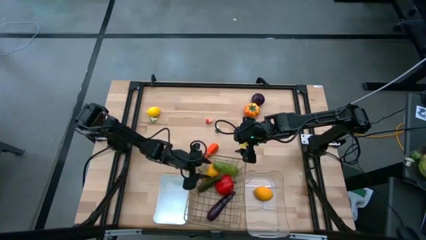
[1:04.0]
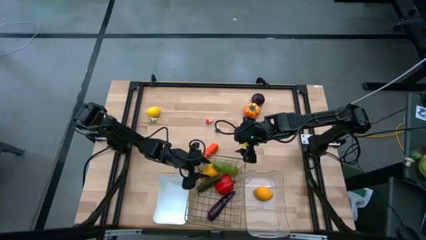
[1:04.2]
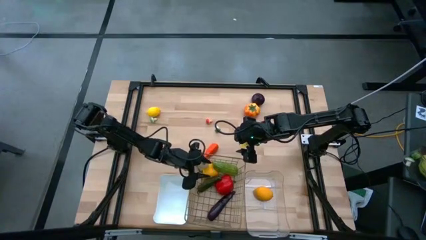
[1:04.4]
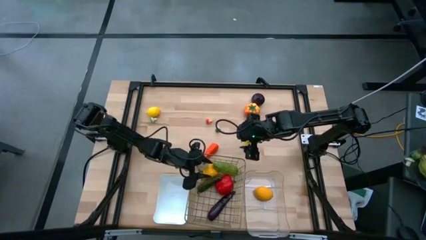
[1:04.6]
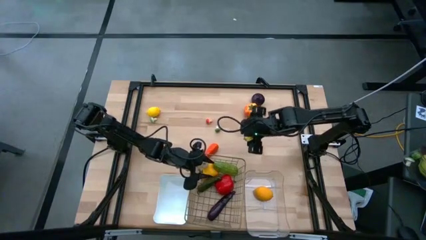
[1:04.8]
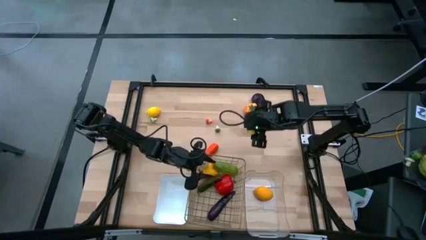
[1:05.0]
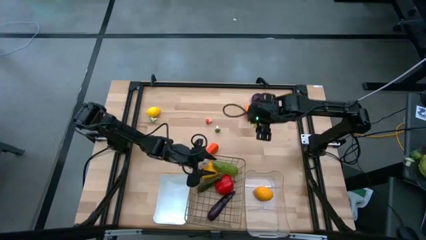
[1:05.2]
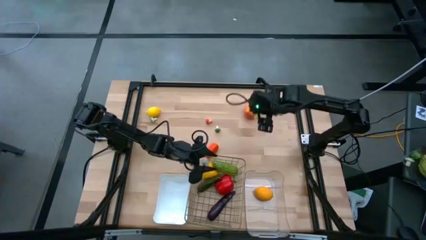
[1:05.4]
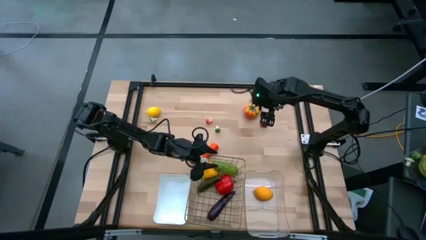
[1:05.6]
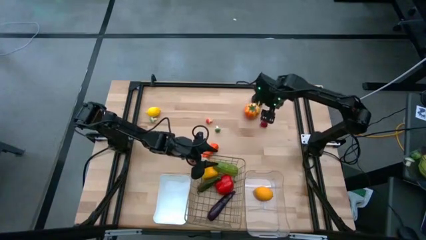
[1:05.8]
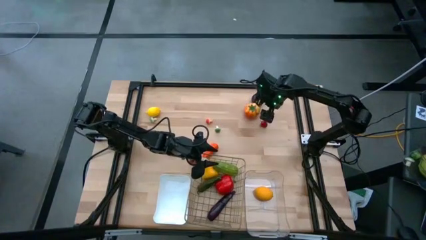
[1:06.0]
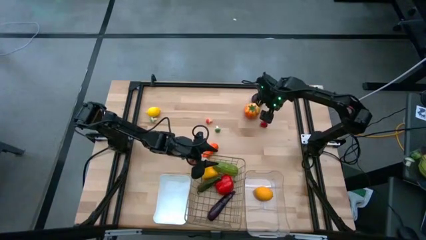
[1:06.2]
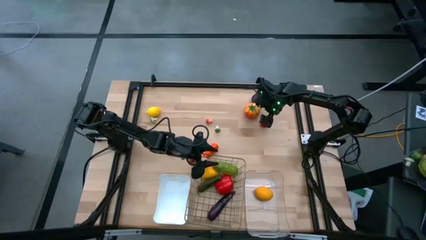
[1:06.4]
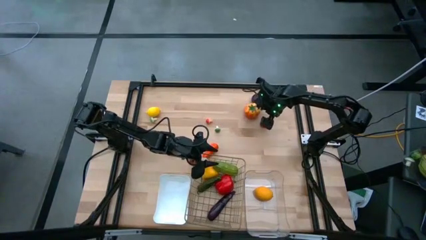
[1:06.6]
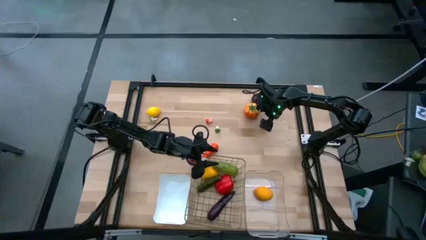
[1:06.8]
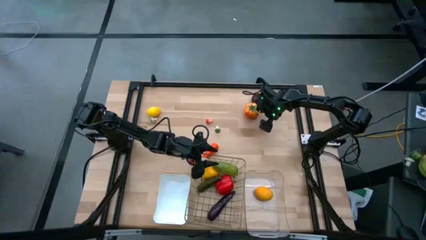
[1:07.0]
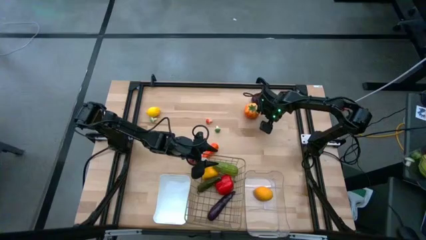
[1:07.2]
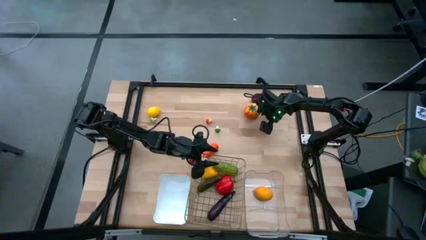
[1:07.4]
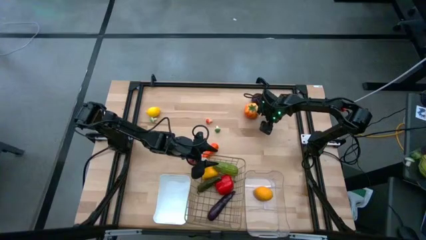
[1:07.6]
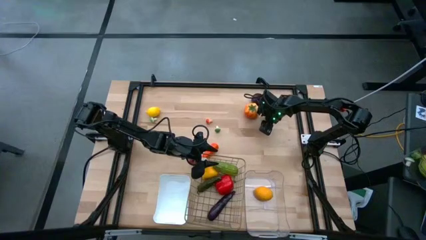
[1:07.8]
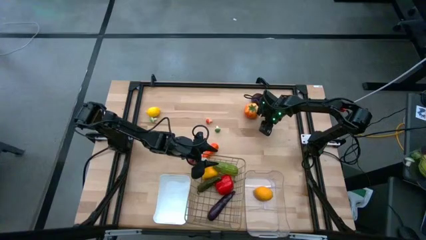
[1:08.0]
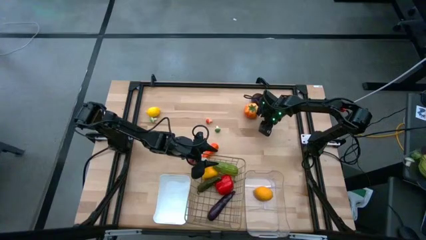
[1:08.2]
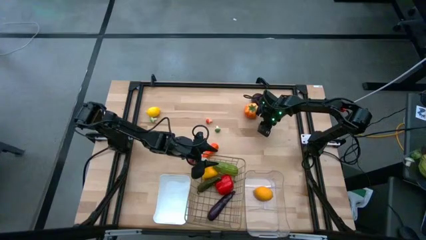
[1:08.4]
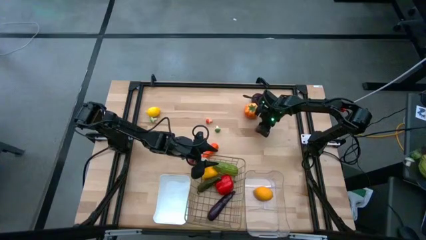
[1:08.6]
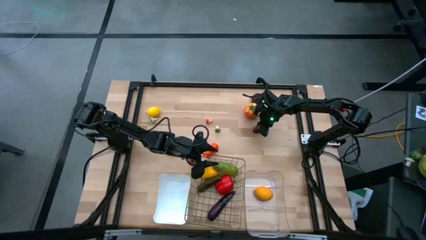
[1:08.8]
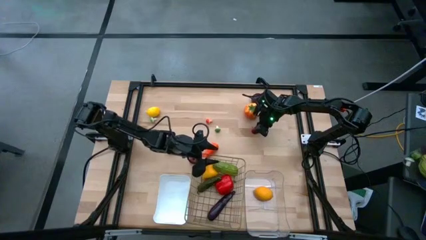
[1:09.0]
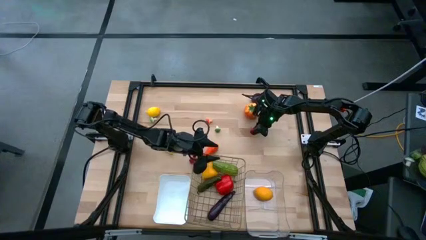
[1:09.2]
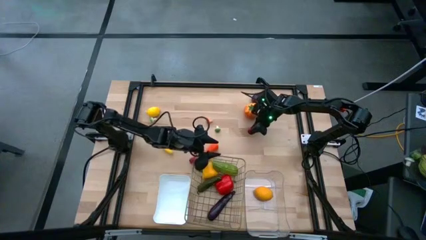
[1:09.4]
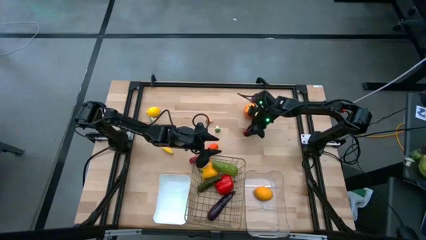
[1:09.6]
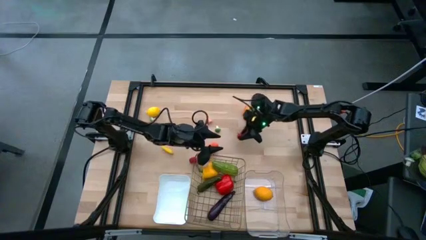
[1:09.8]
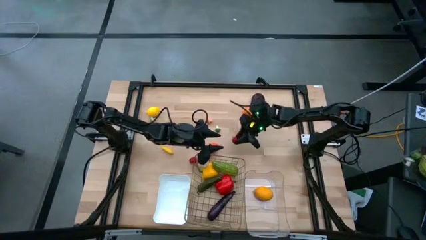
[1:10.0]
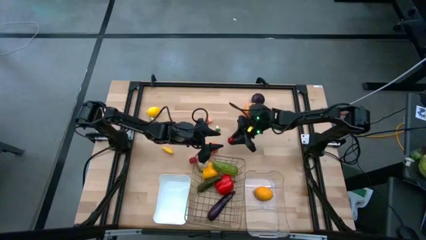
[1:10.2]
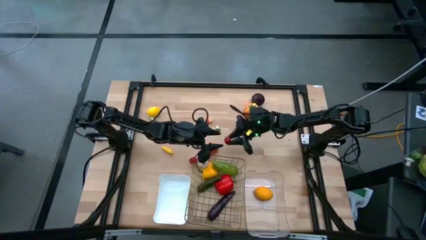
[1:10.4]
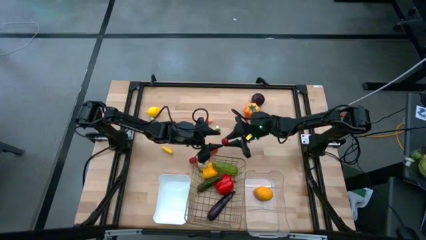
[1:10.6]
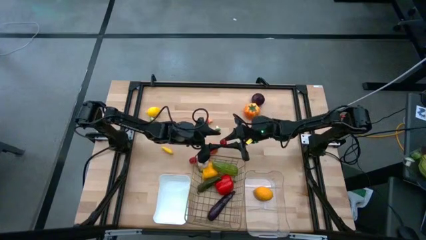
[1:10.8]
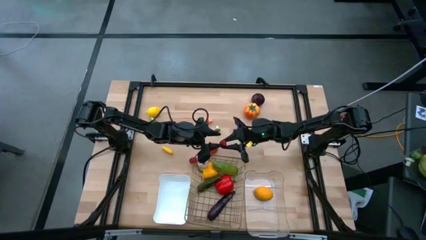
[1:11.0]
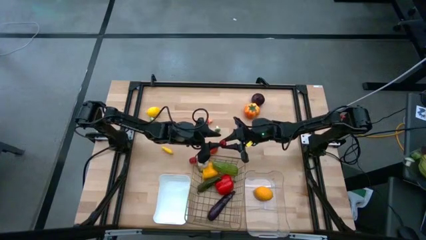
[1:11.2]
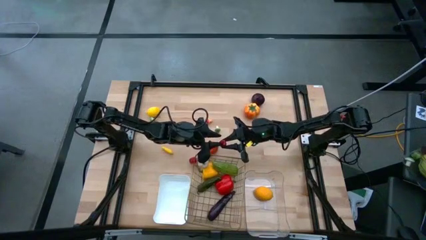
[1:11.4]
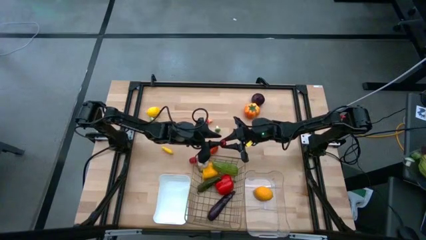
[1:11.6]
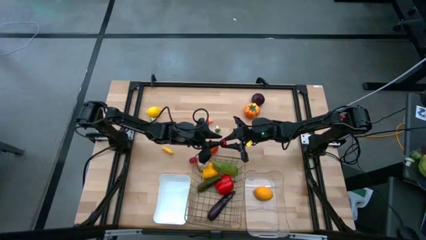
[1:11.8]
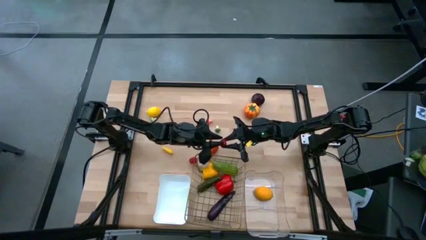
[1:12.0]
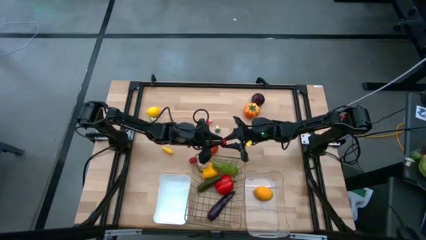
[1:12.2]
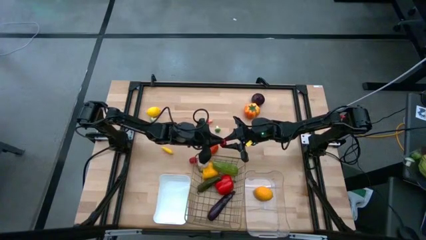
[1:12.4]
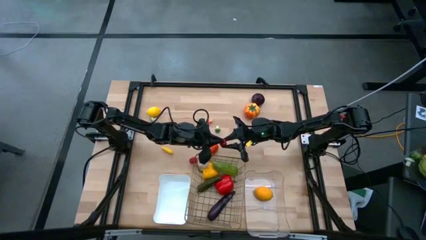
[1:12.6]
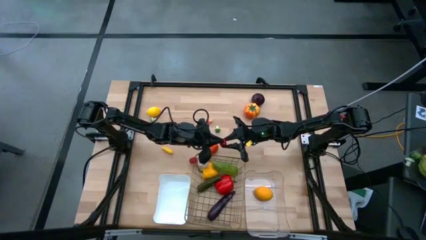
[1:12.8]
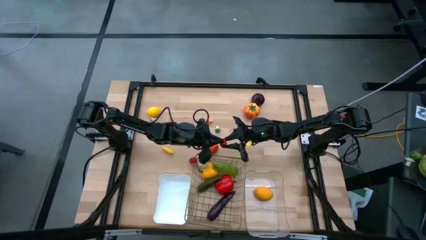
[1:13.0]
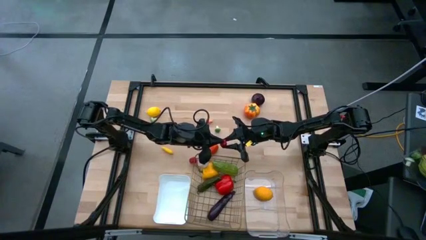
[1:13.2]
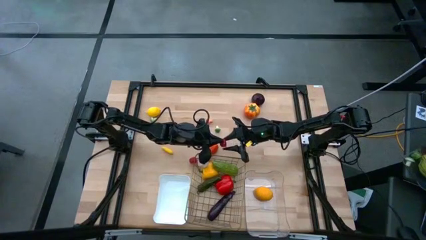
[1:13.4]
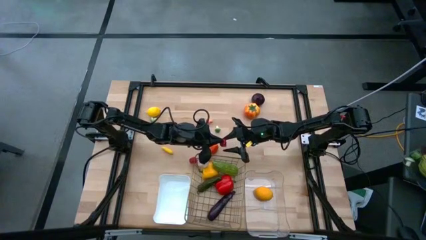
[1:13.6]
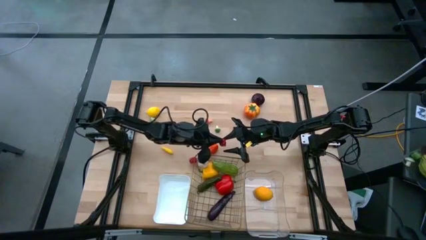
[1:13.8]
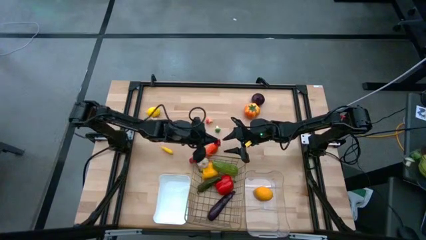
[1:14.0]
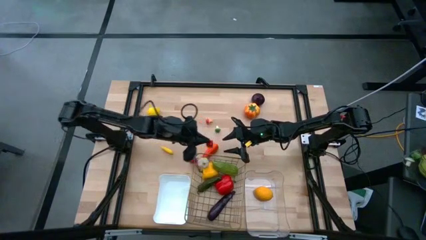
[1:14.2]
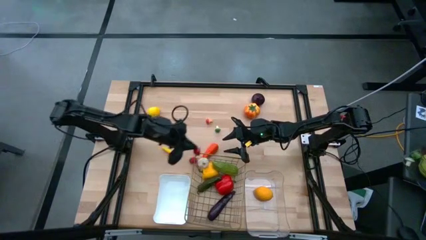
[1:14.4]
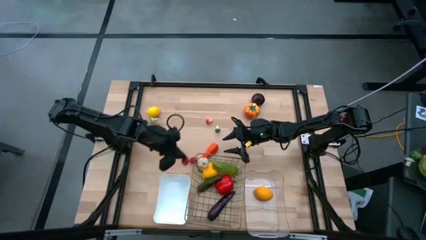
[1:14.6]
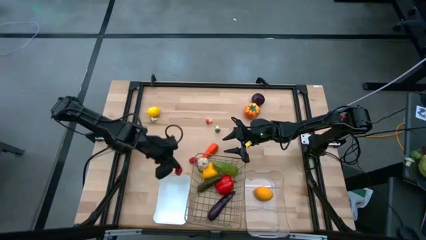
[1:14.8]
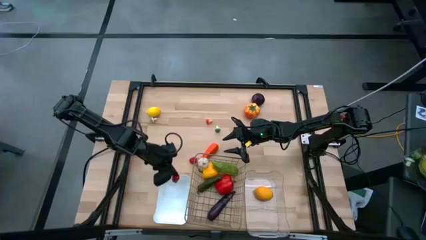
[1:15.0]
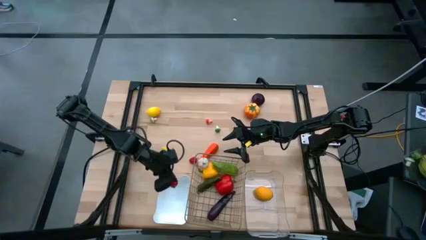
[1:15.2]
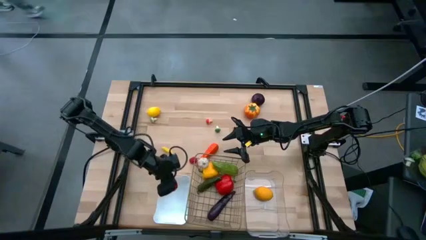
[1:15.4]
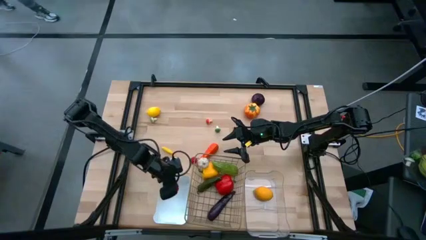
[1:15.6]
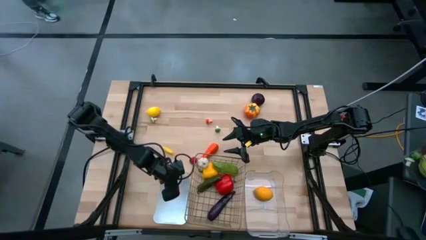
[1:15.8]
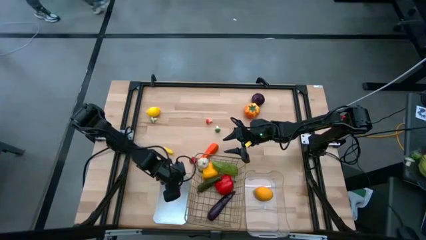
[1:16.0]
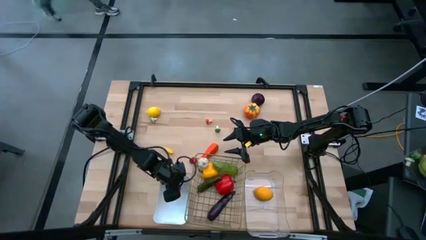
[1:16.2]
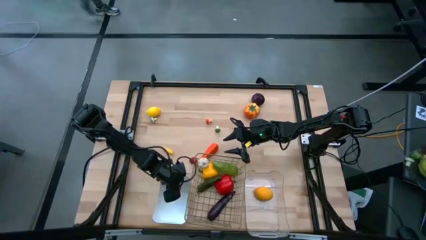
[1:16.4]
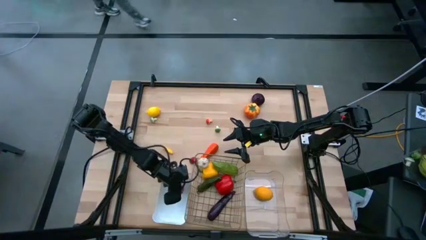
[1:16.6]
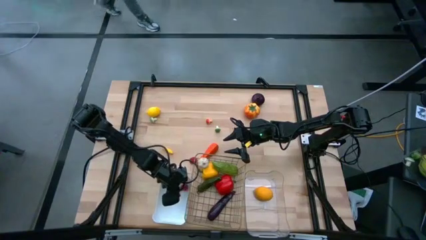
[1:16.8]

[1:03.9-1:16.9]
Task: Sort produce into baskets
Put the top small red bell pepper into the white bin

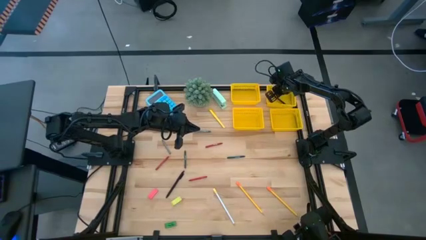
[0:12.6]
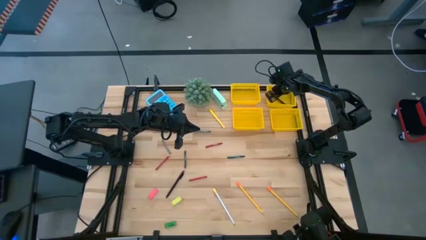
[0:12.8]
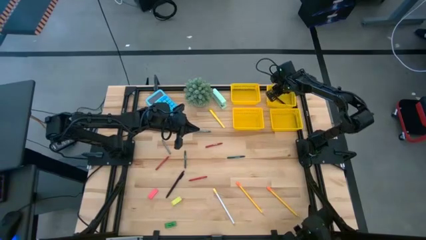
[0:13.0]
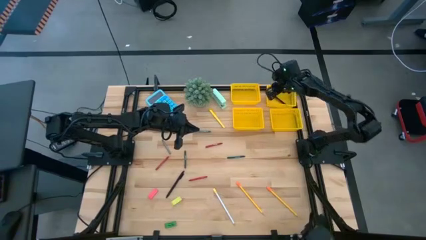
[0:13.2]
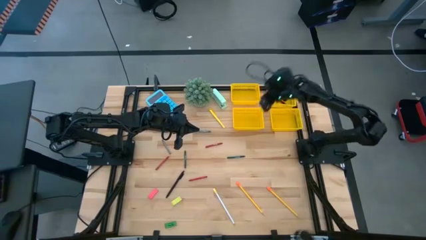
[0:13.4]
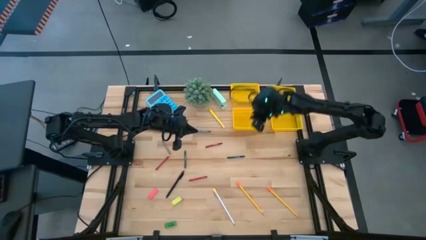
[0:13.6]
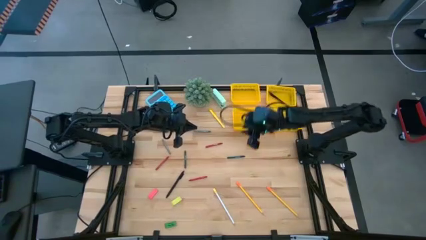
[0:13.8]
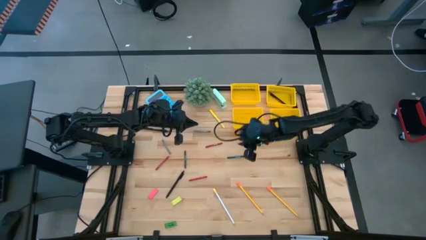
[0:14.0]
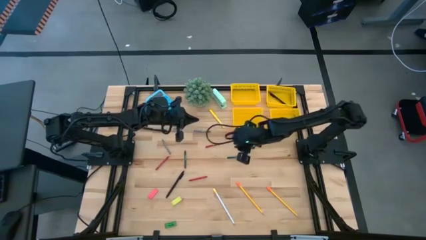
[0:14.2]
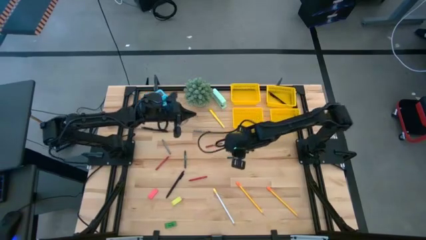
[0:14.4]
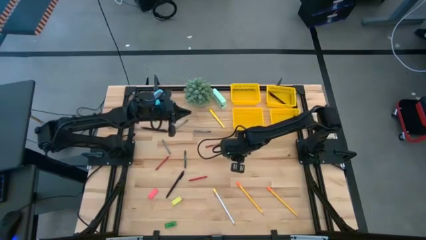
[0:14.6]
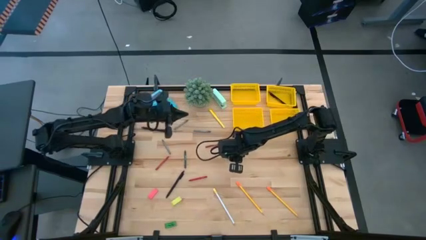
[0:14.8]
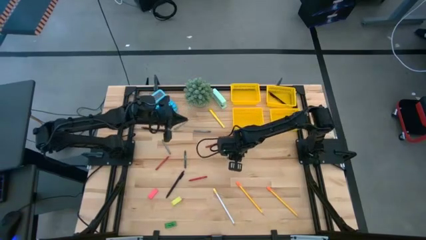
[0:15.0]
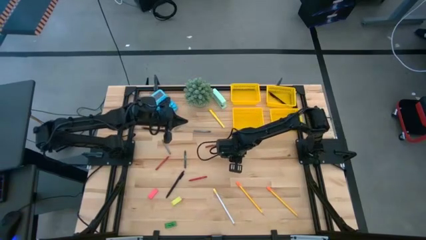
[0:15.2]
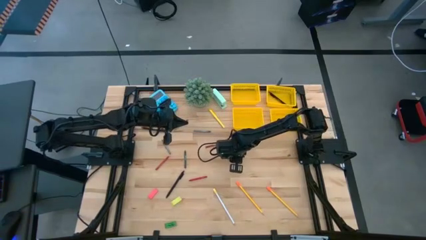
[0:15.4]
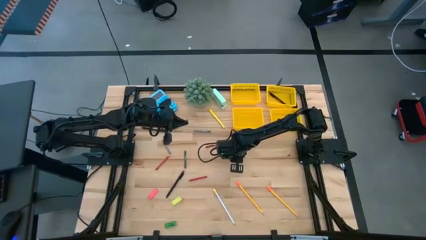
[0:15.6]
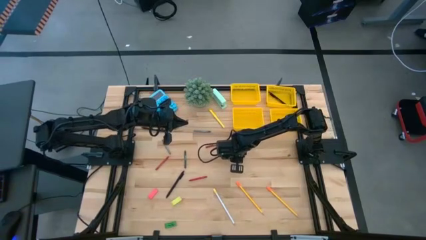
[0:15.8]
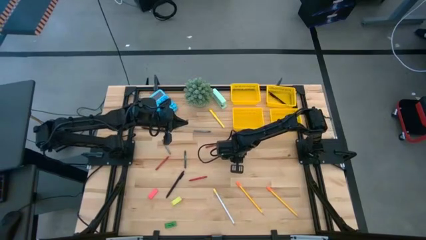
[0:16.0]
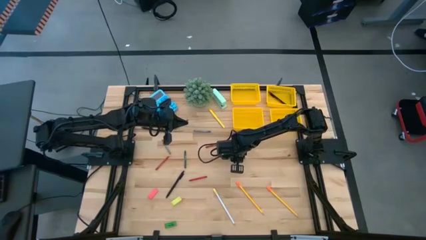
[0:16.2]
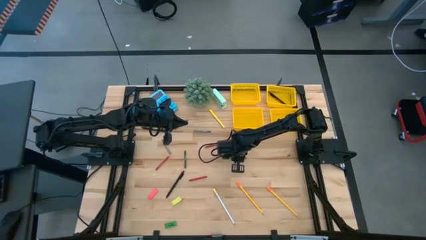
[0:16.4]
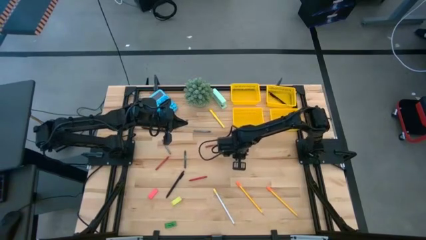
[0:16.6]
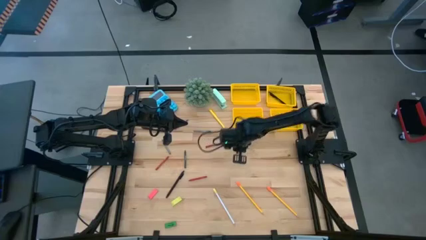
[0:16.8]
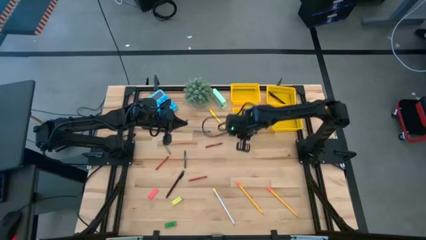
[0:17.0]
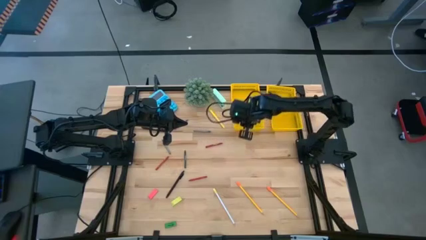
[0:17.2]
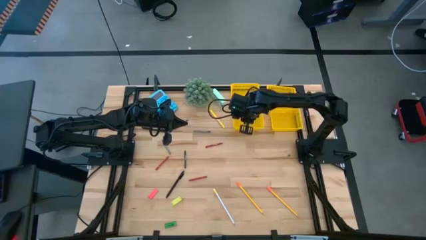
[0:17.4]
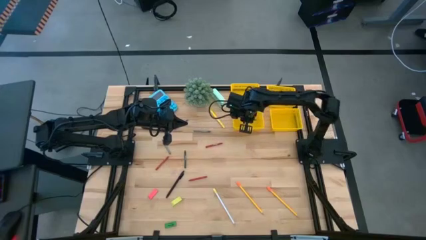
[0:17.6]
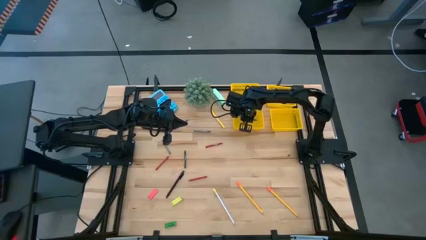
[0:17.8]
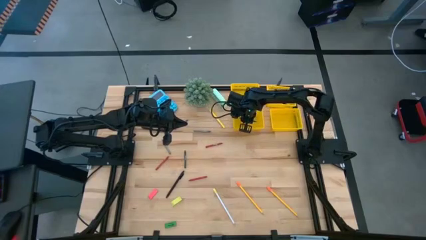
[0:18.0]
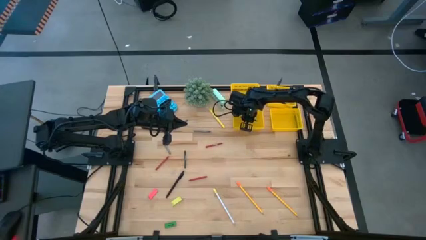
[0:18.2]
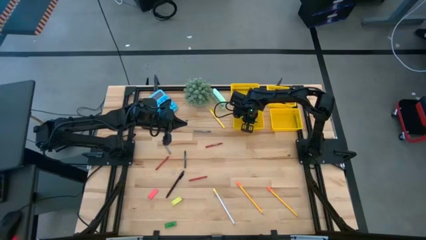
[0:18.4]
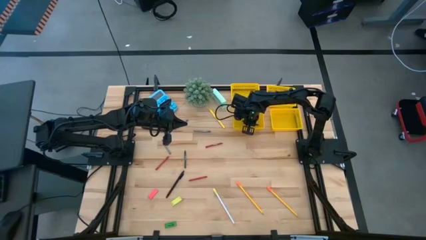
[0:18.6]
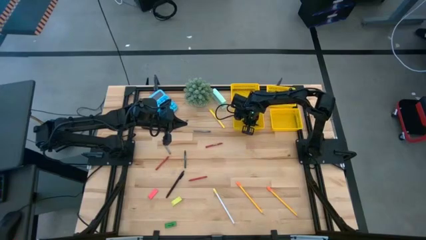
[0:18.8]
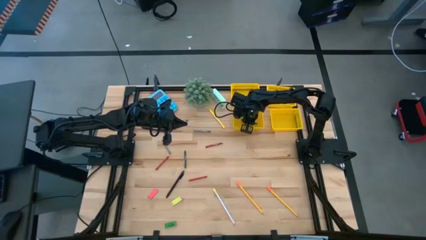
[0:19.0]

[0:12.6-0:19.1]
Task: Sort crayons/erasers/pens/pencils in bins
Put the right green crayon into the bottom left yellow bin
